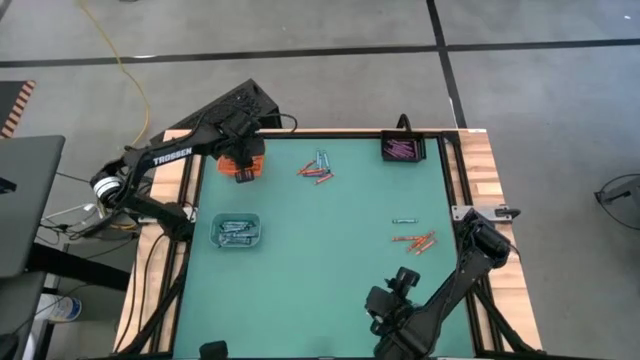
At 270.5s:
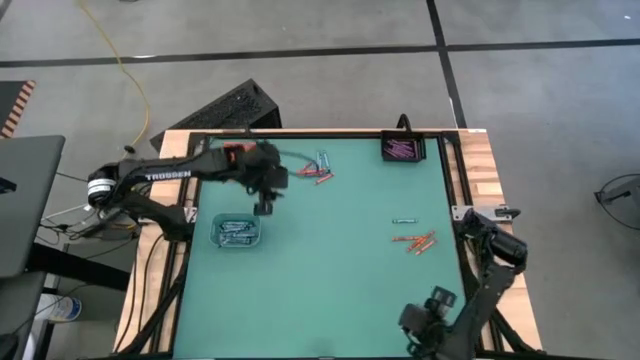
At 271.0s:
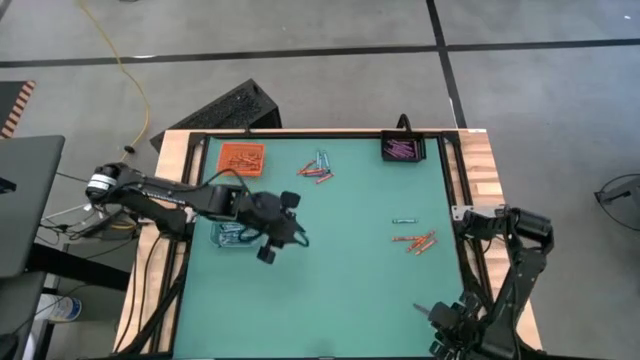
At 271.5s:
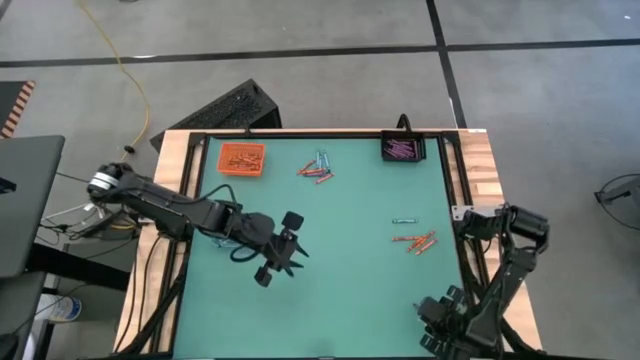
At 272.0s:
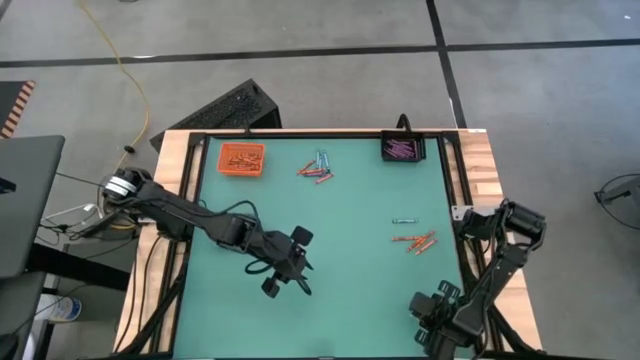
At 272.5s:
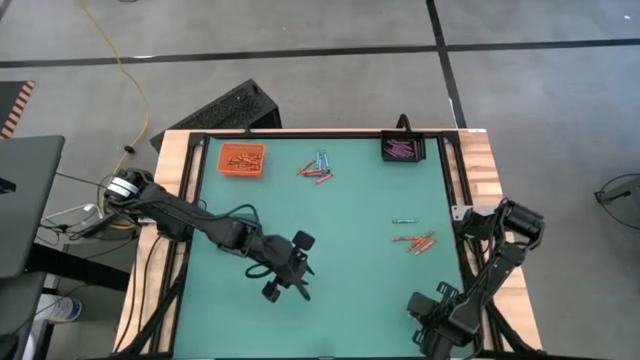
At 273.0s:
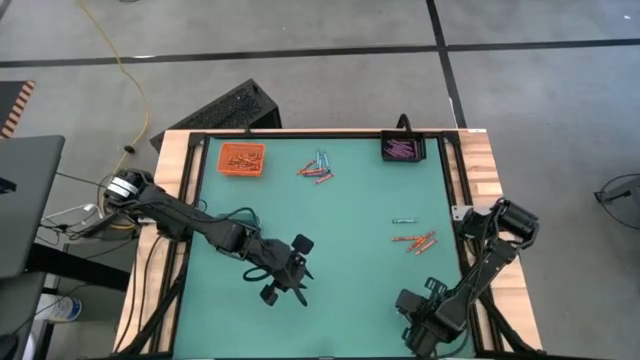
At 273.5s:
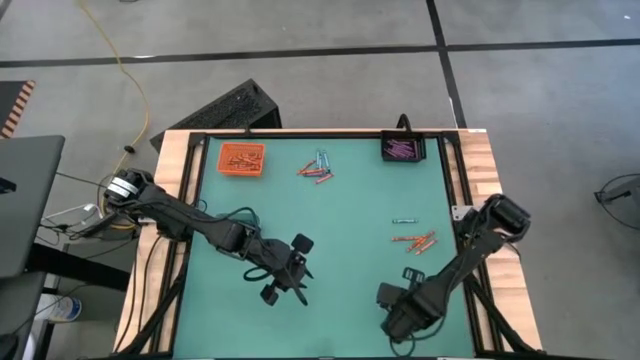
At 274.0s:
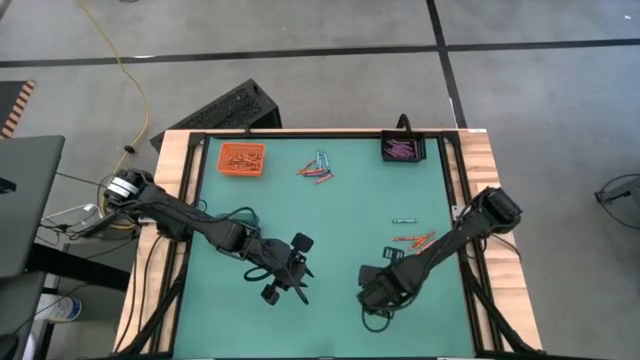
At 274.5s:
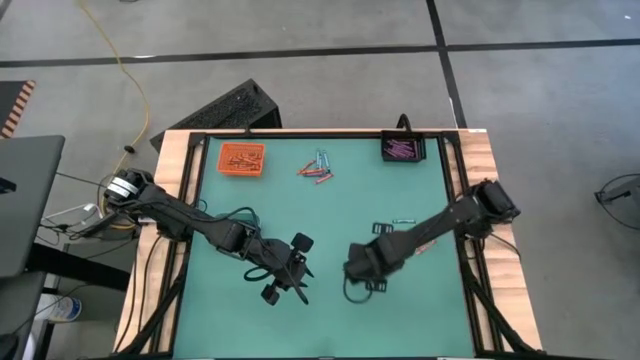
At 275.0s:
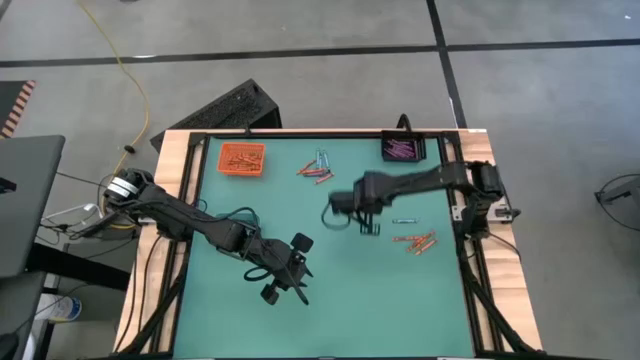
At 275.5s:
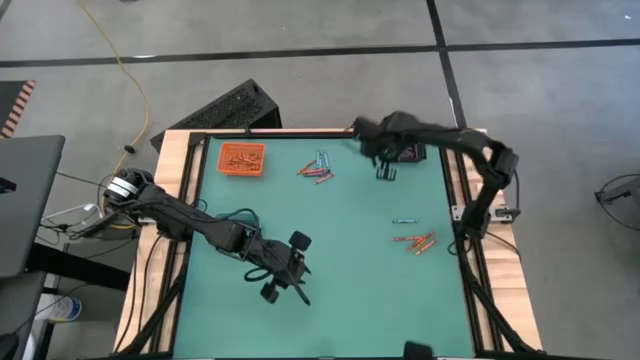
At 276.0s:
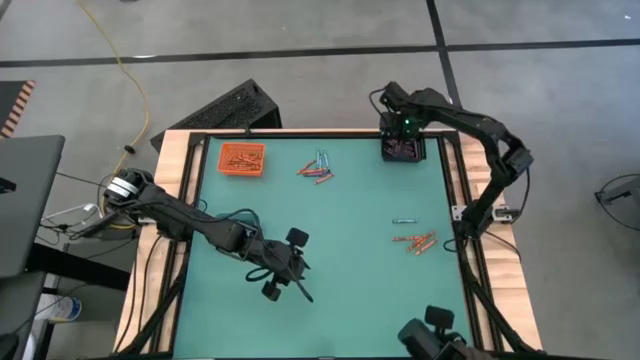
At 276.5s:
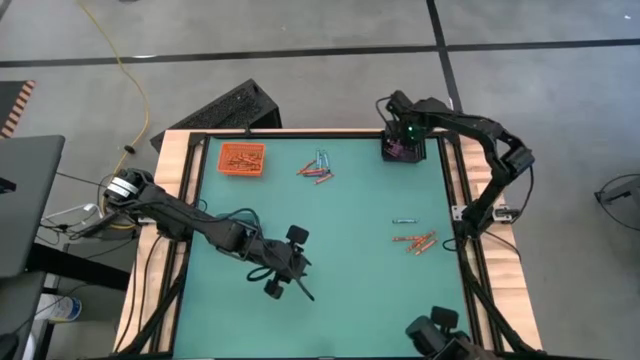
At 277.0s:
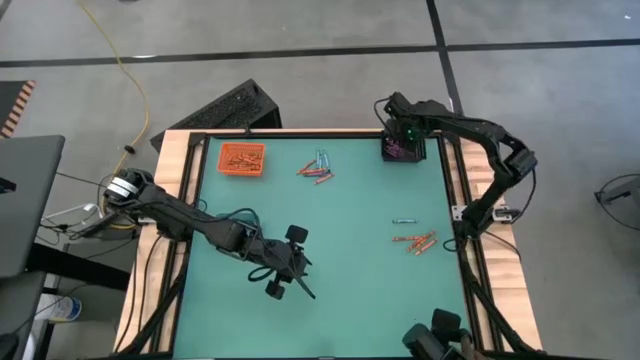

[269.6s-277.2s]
Task: Sort crayons
Put the purple crayon into the black basket

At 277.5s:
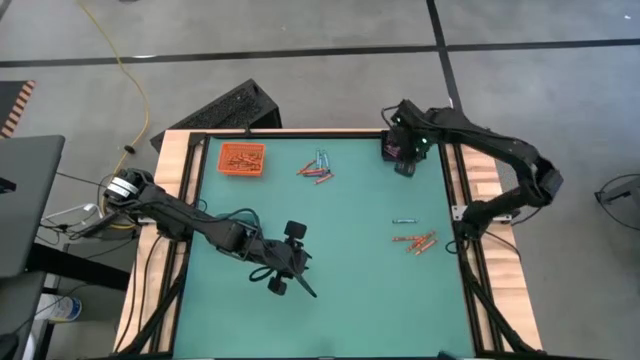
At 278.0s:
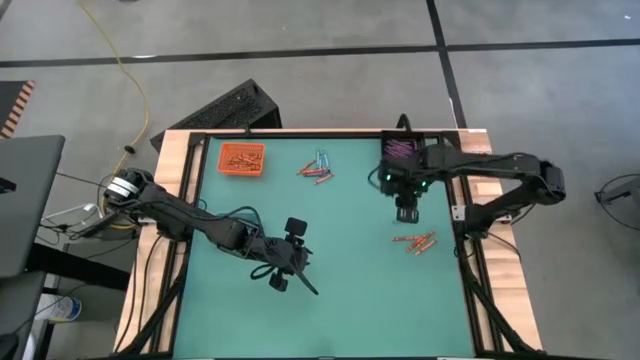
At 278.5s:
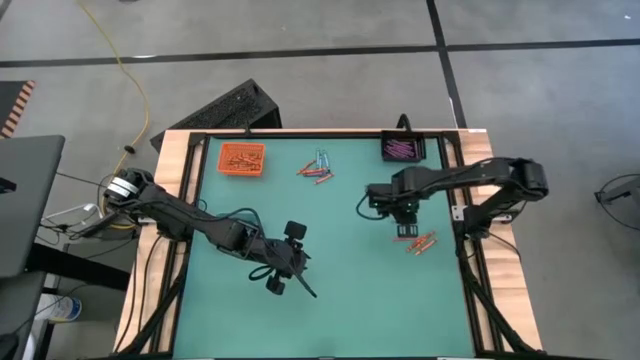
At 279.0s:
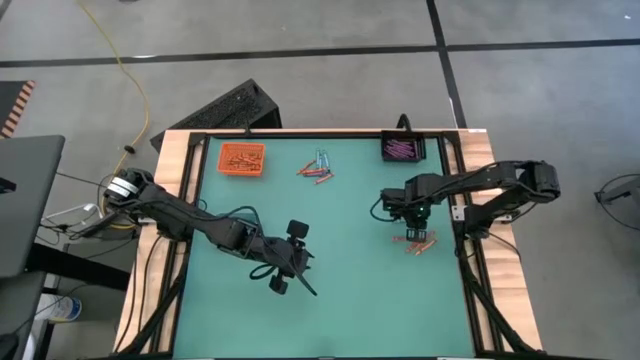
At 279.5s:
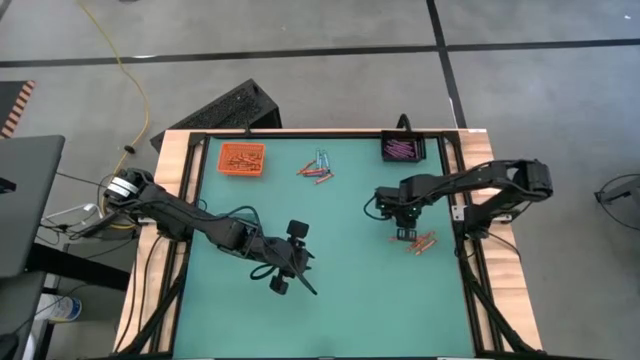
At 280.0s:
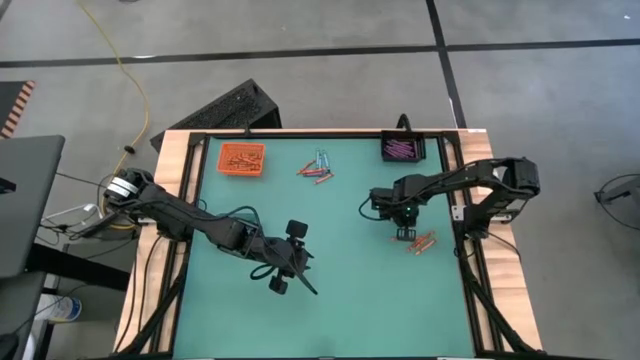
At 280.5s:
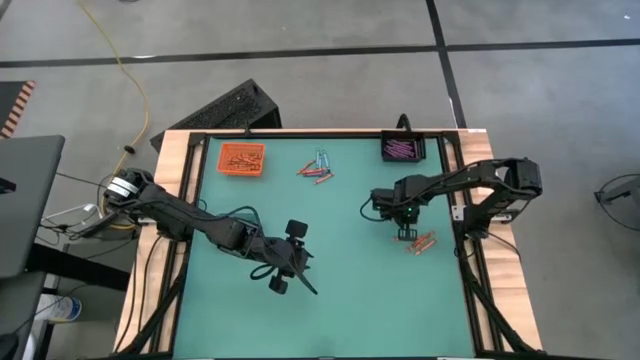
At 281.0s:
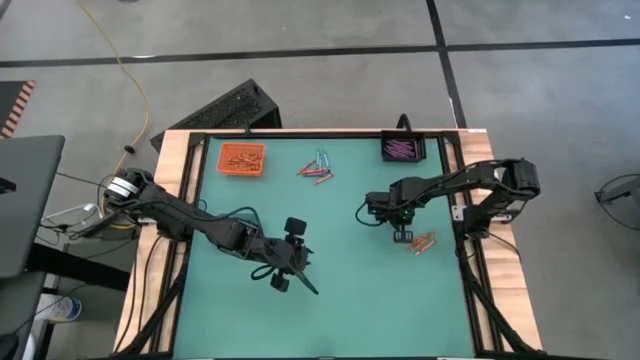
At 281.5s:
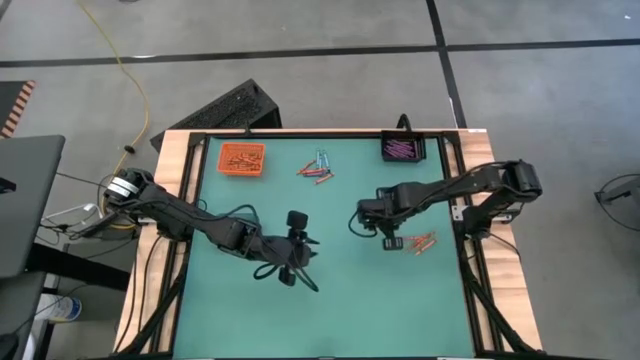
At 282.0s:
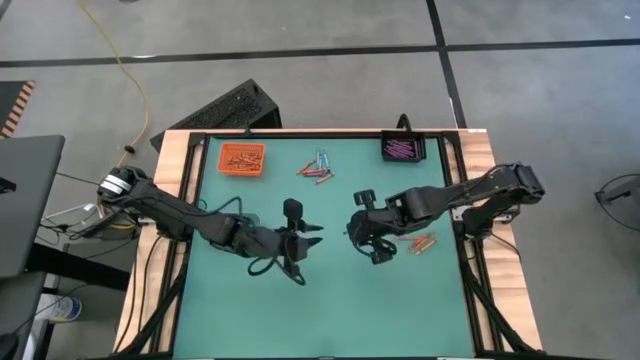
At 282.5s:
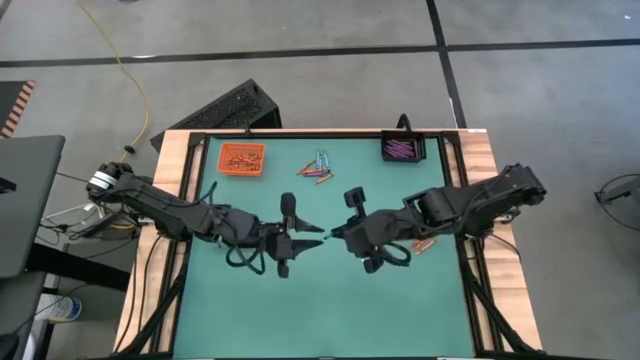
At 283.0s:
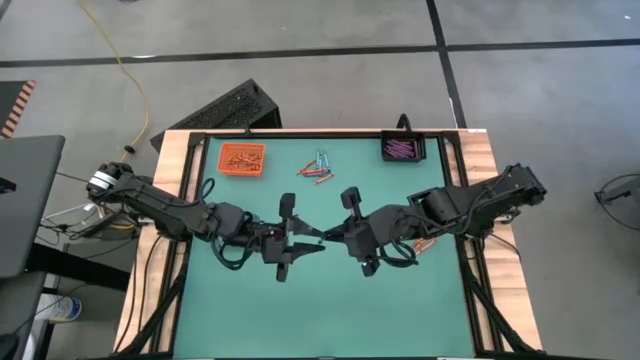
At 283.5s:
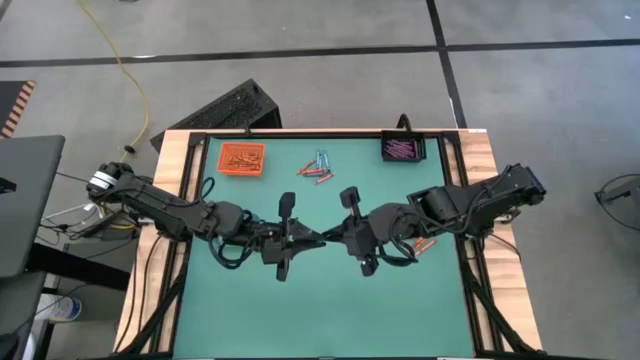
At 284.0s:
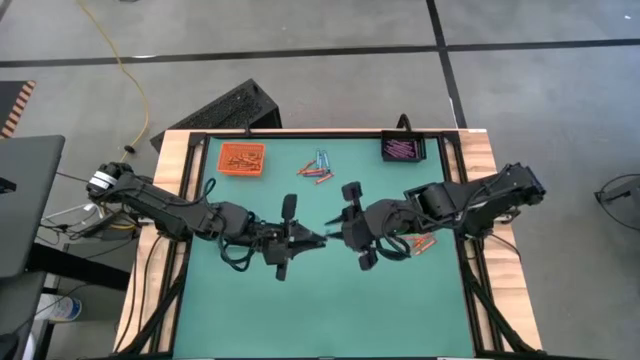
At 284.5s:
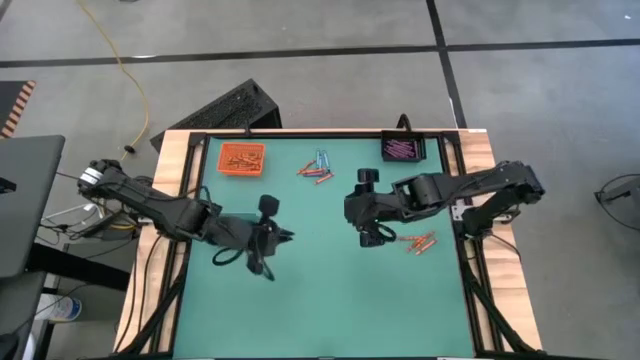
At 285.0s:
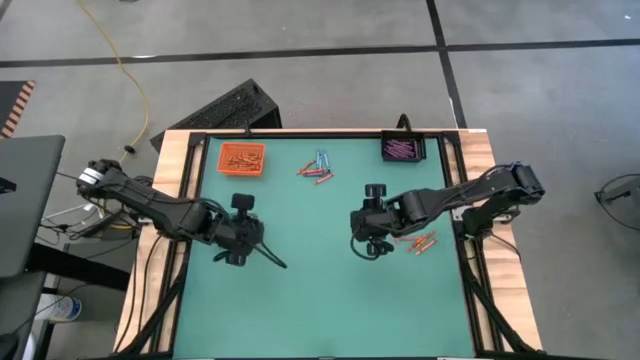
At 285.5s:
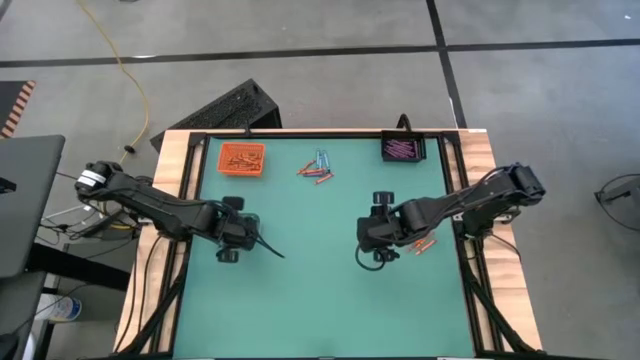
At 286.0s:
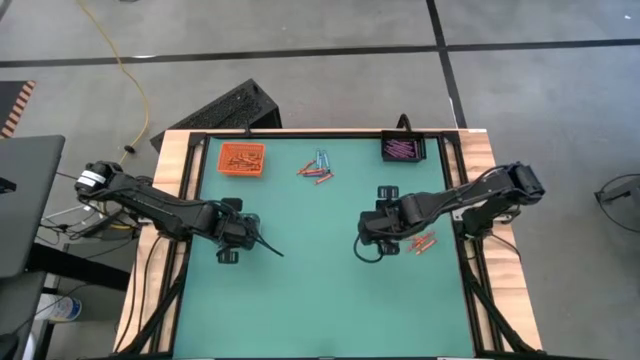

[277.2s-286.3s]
Put the blue crayon into the blue bin

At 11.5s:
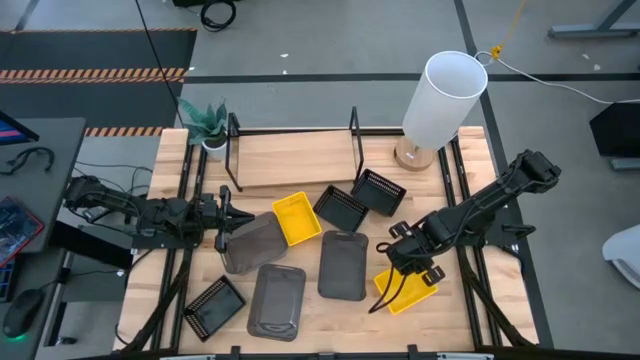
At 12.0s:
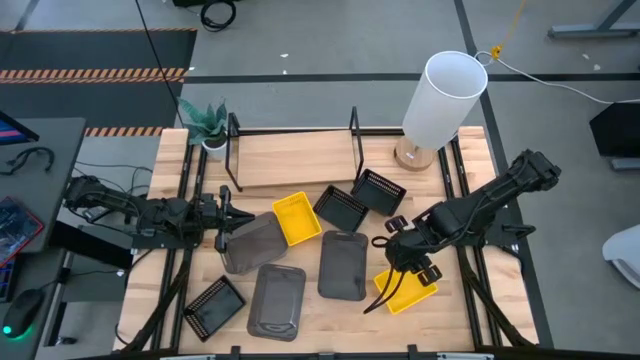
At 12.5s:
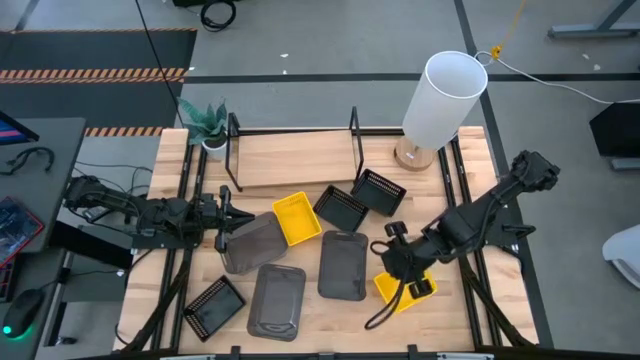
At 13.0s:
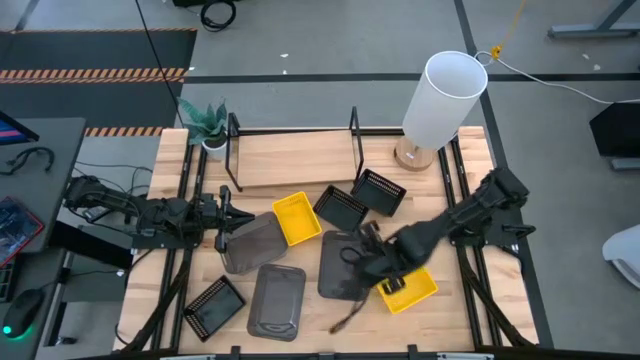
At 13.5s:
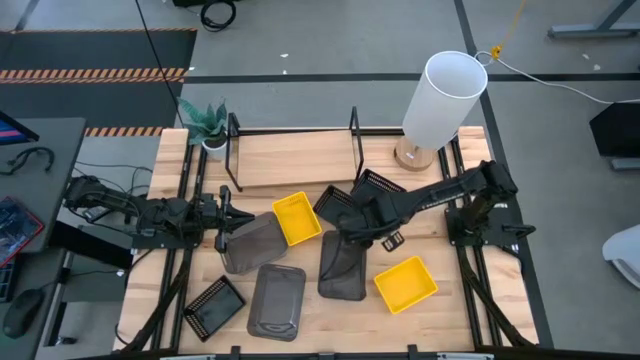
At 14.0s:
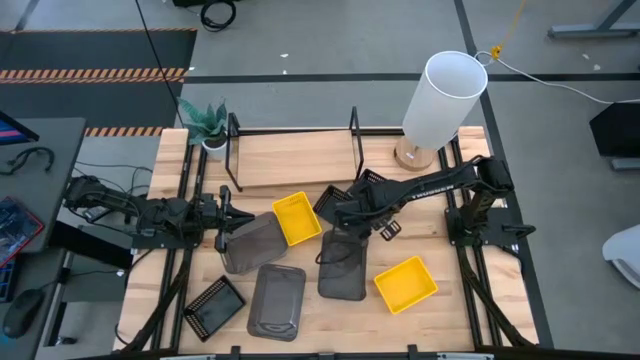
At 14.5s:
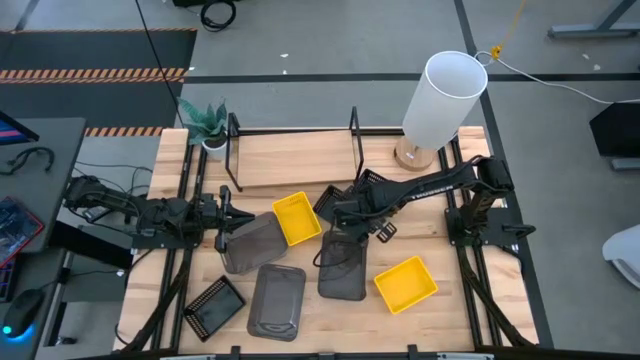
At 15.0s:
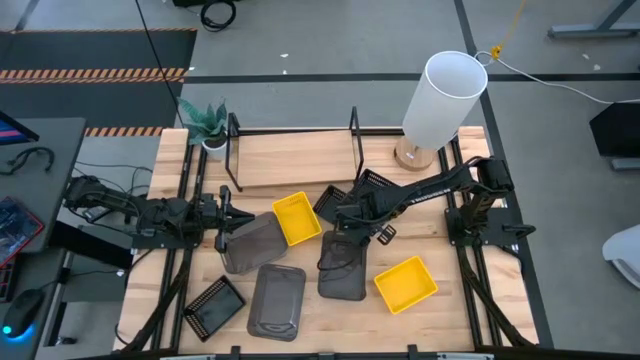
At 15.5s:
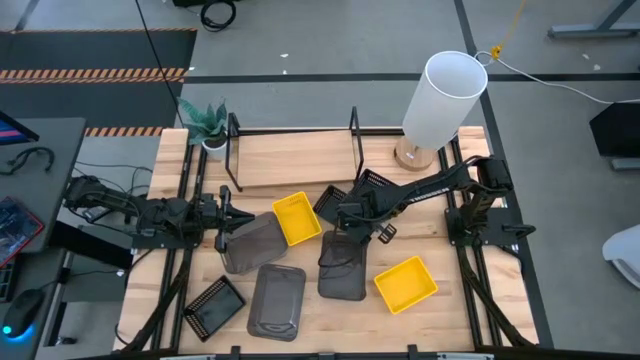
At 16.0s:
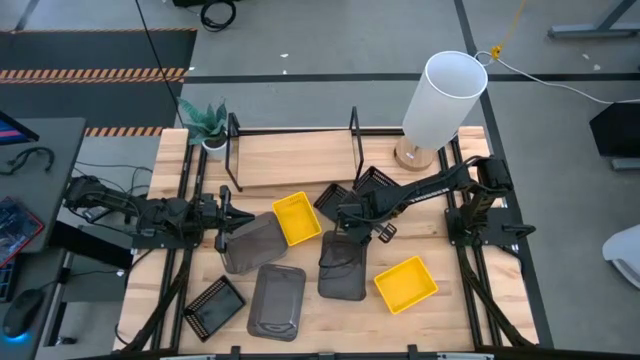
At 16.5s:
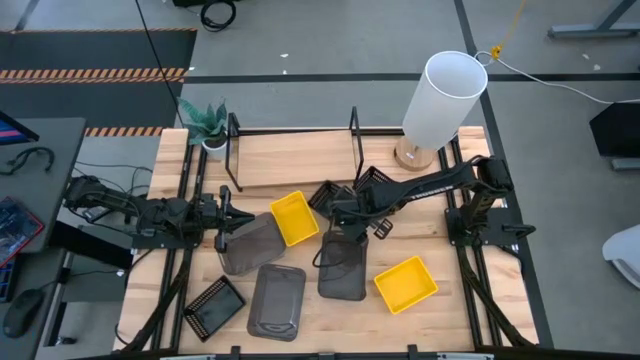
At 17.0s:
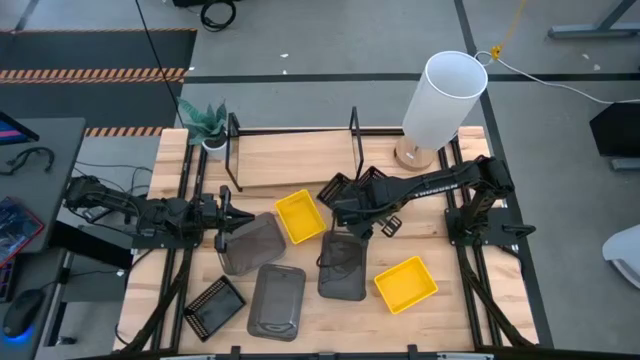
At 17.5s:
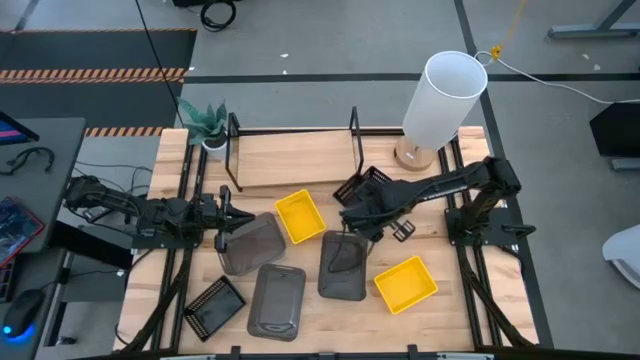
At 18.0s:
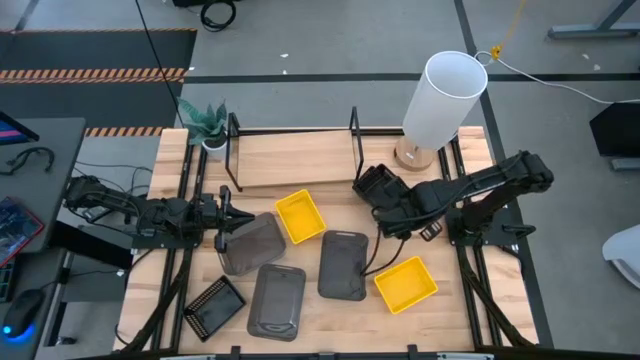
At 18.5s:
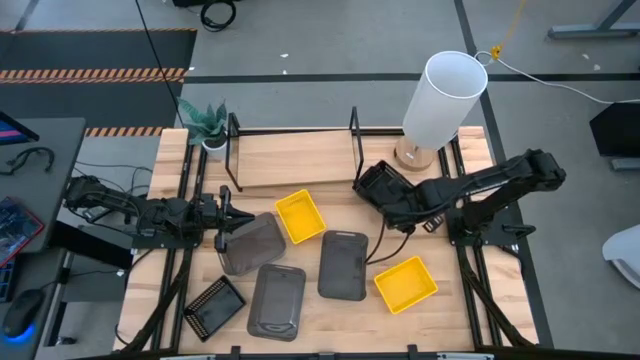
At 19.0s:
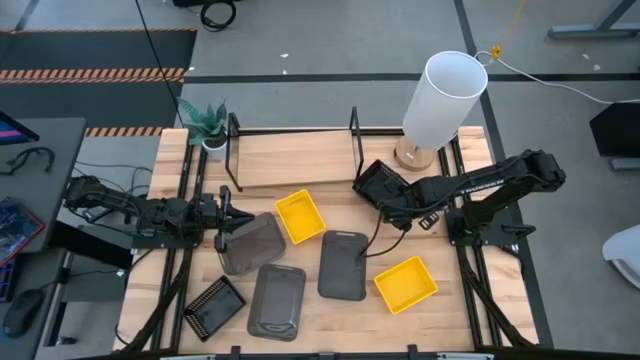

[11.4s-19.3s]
Task: Stack baskets on shelf by color
Stack the top left black bin on top of the black bin
